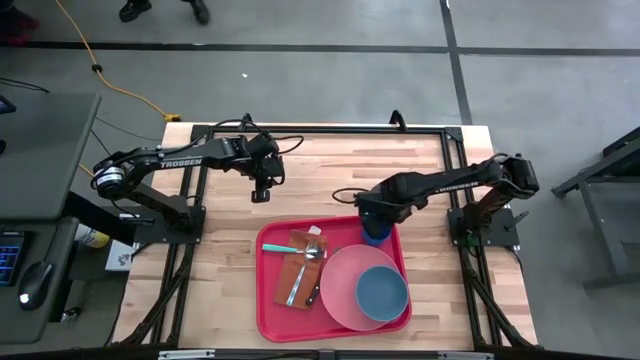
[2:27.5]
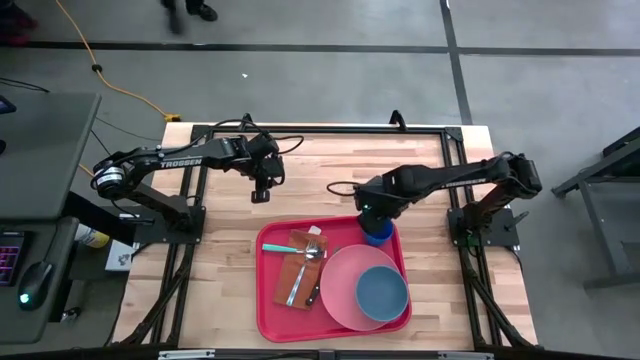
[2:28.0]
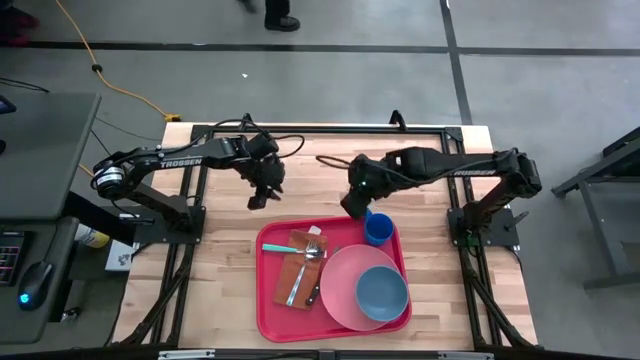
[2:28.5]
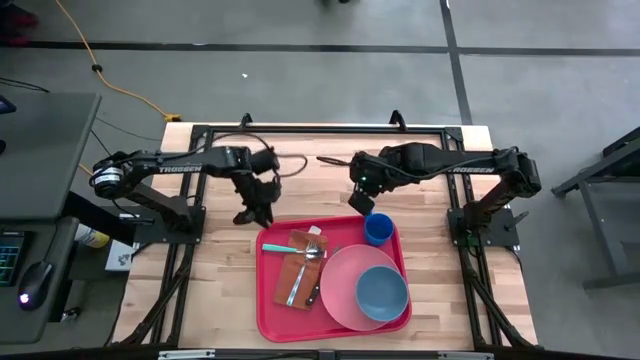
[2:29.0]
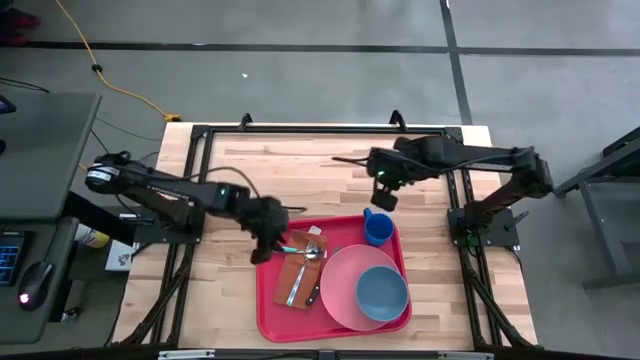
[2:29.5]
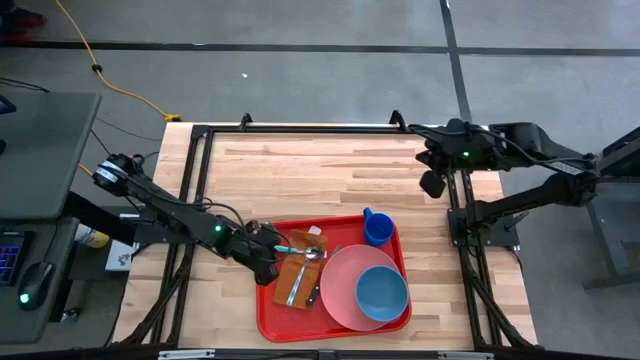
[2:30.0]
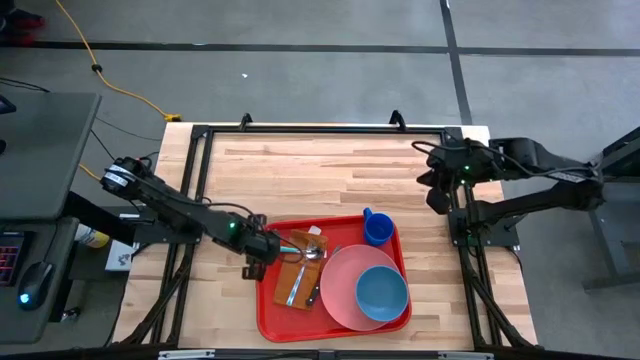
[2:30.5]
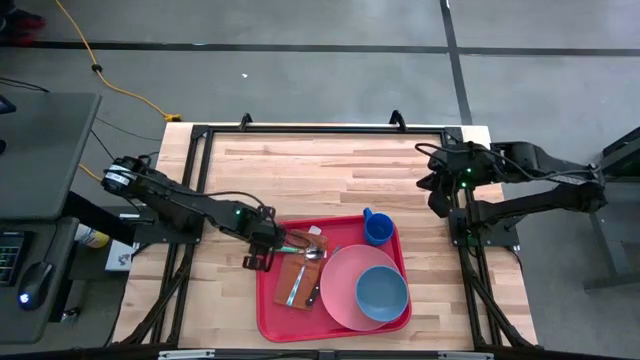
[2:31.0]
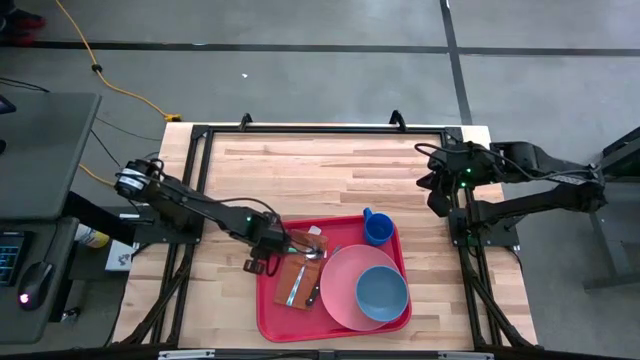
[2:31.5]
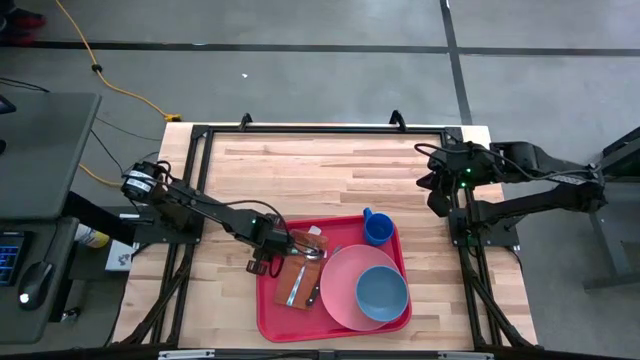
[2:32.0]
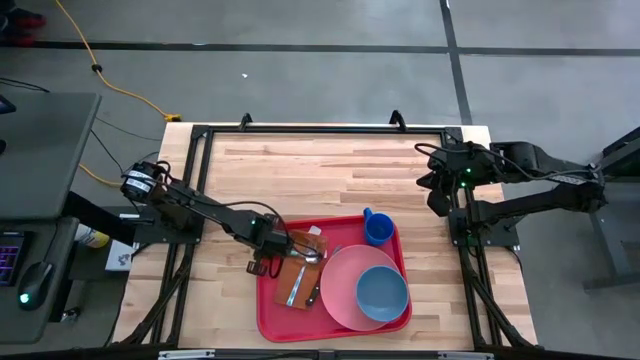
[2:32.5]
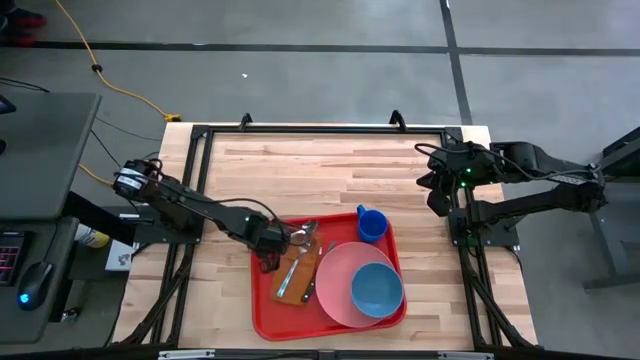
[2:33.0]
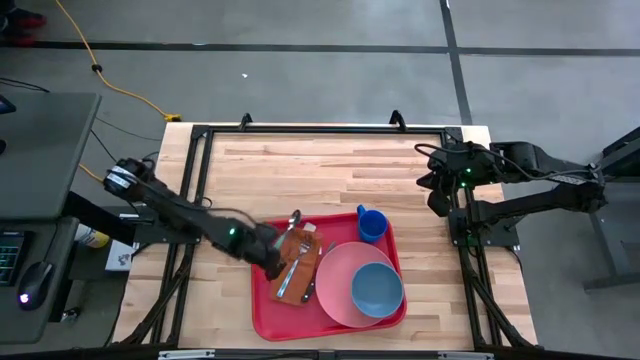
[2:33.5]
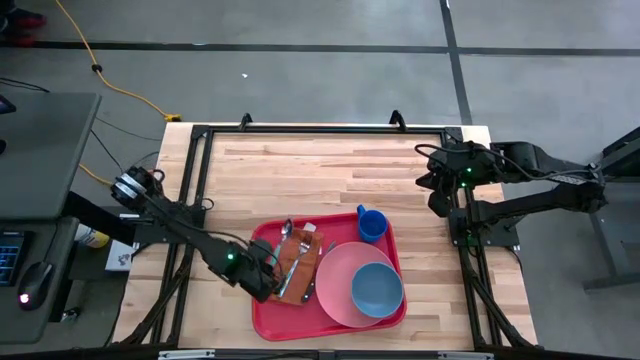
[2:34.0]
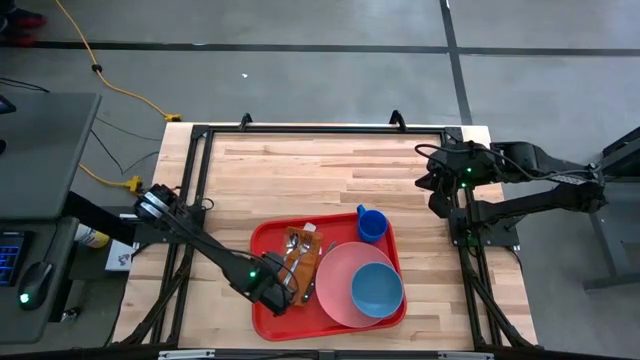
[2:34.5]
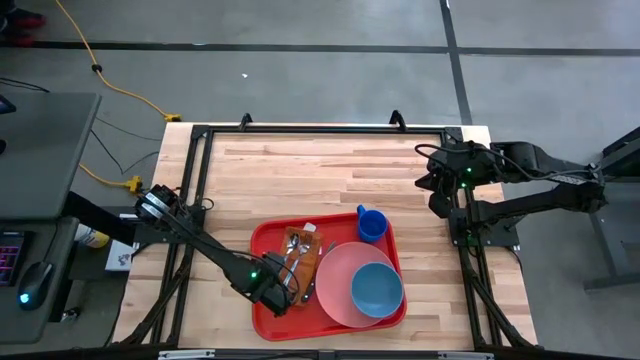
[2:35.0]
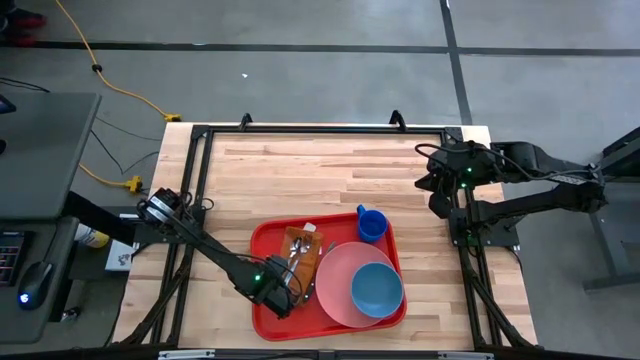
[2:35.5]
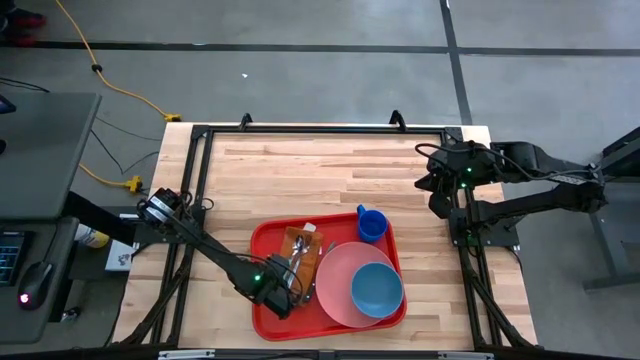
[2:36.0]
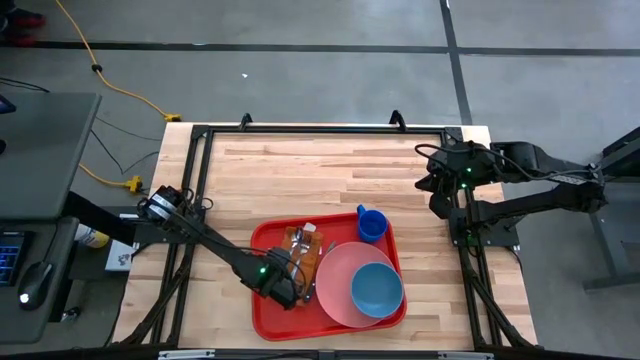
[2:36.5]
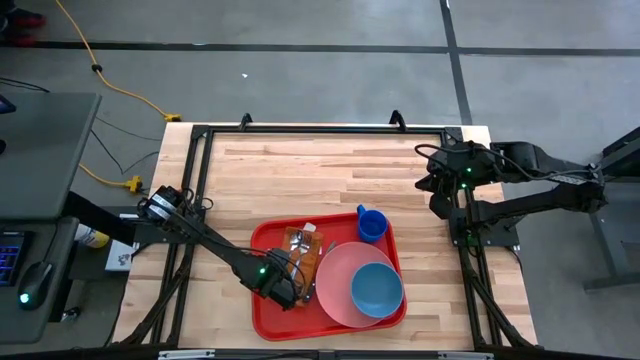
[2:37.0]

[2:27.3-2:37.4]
Task: Set up tray
Adjust the blue spoon on the orange napkin

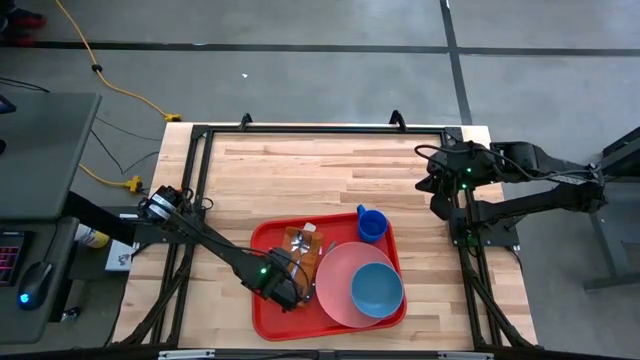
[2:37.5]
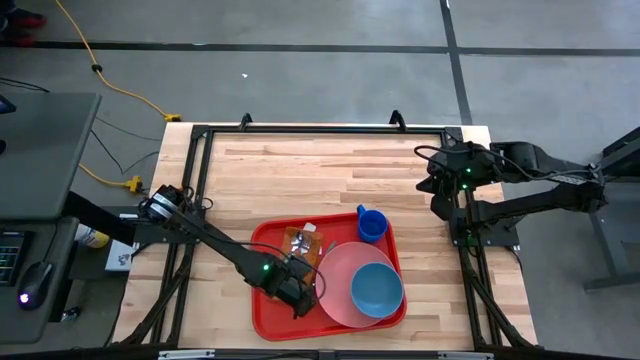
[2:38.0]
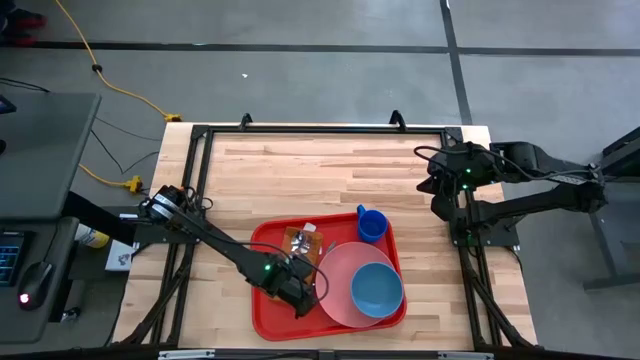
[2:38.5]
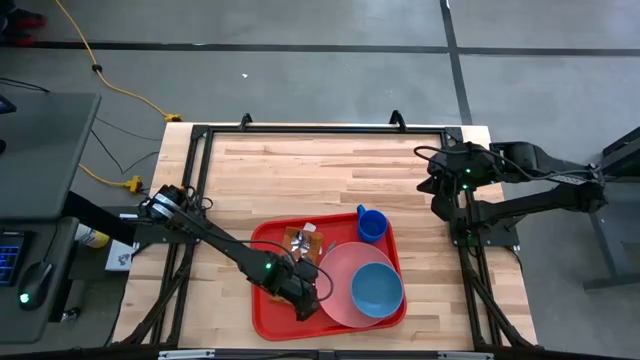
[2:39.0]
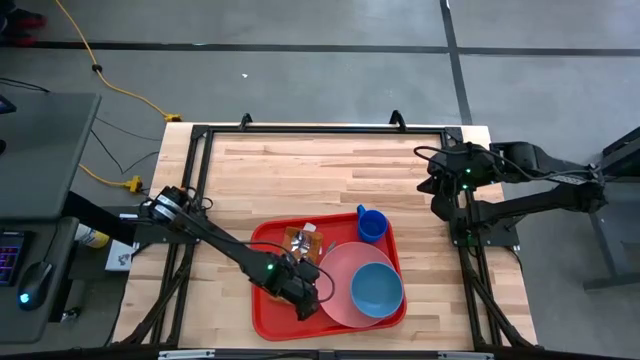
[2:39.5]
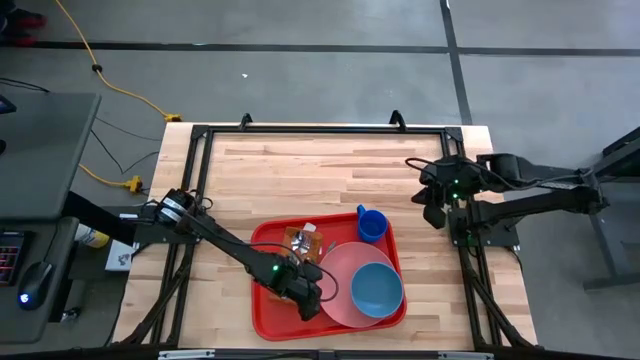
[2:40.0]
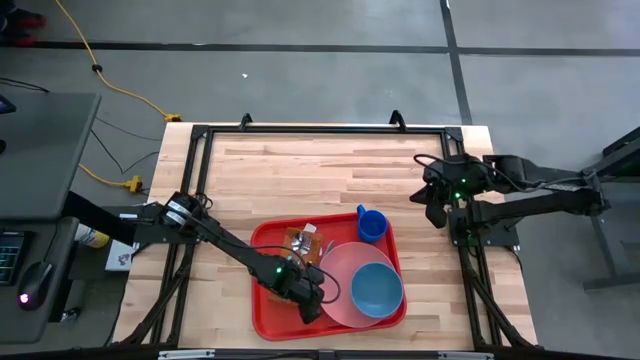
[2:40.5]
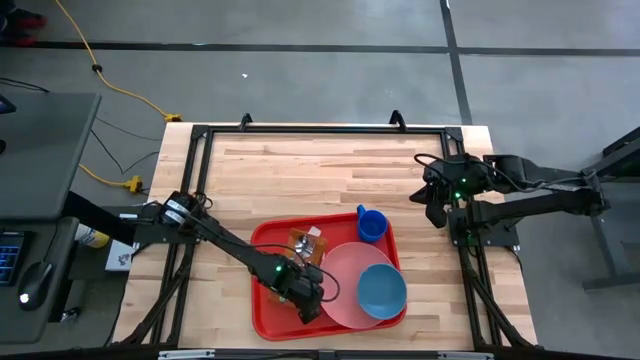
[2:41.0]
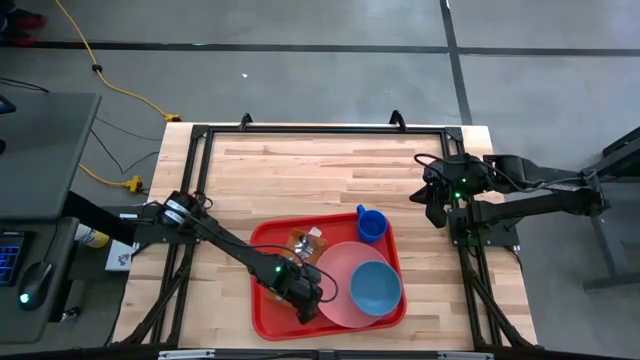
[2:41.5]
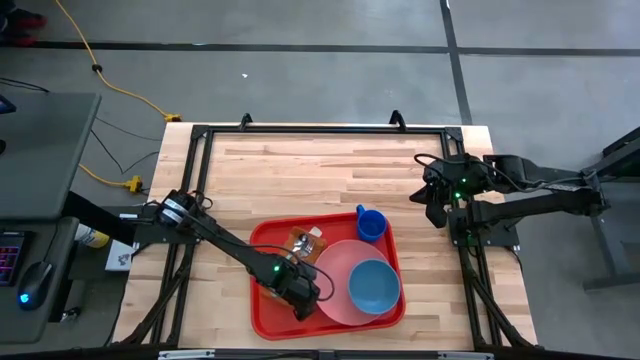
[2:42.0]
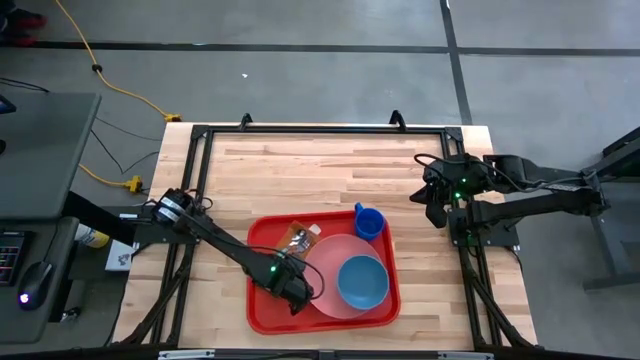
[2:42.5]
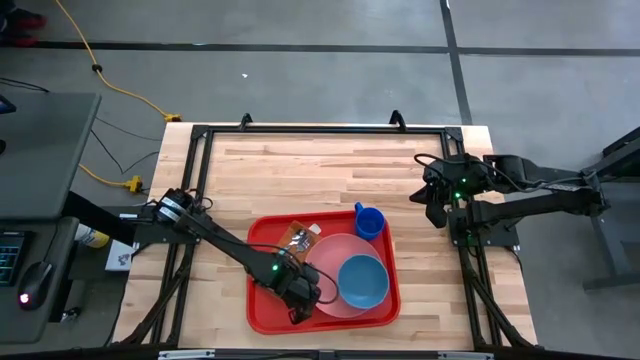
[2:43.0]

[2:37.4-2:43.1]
Adjust the knife on the orange napkin

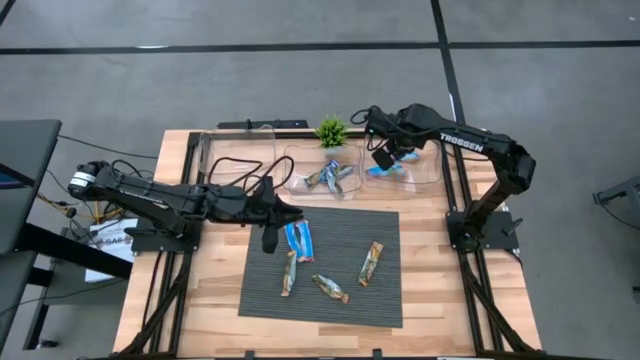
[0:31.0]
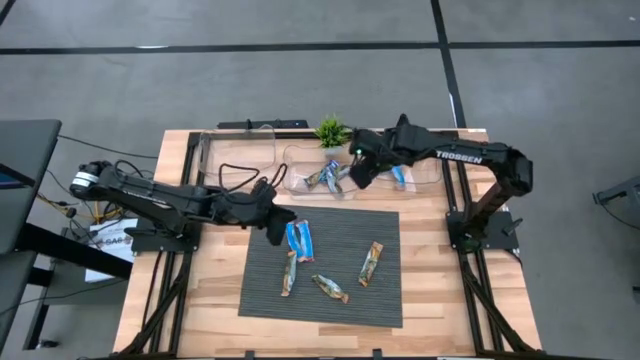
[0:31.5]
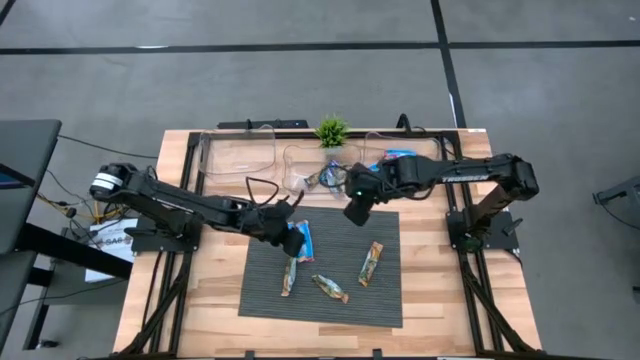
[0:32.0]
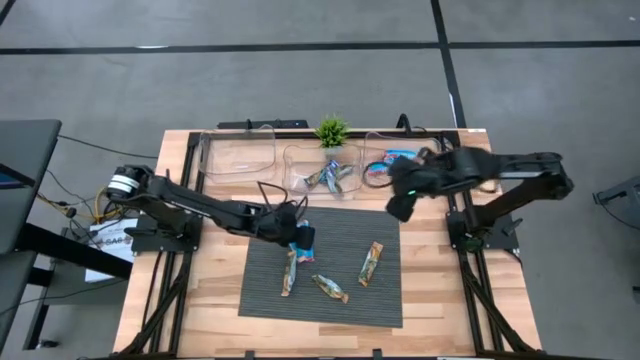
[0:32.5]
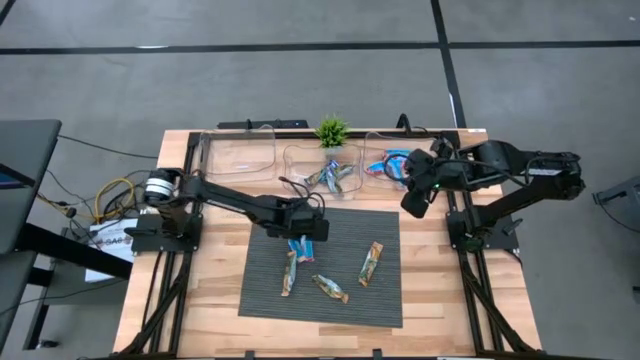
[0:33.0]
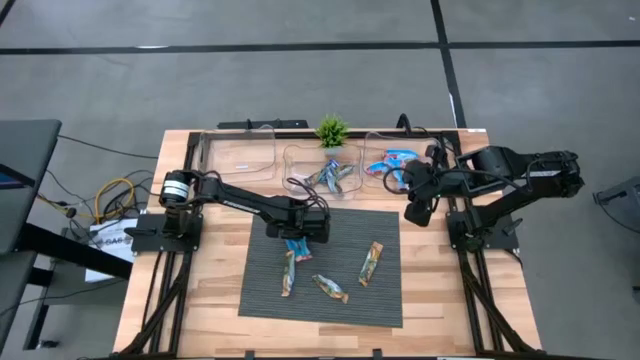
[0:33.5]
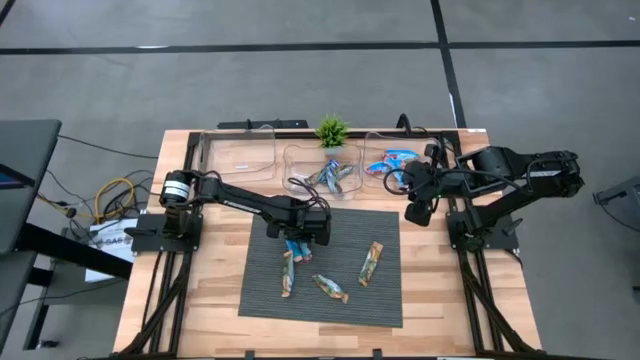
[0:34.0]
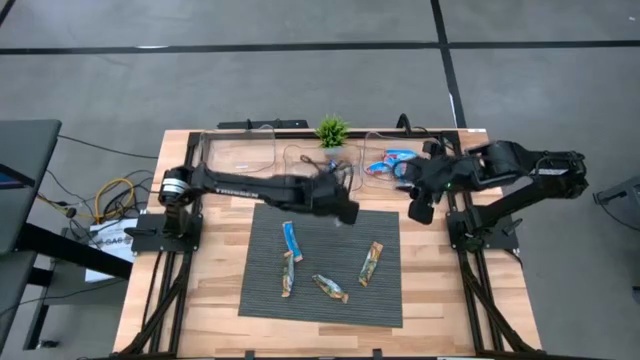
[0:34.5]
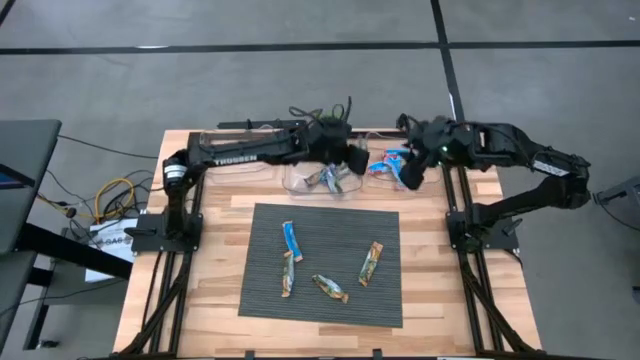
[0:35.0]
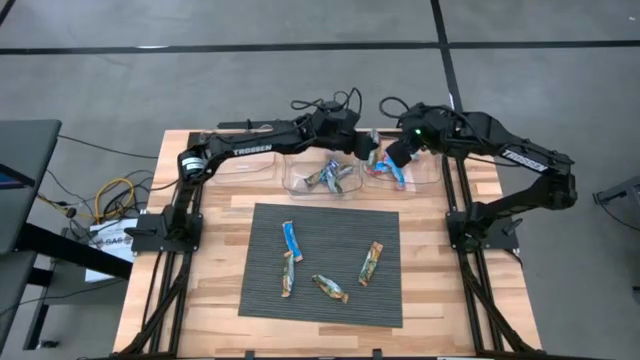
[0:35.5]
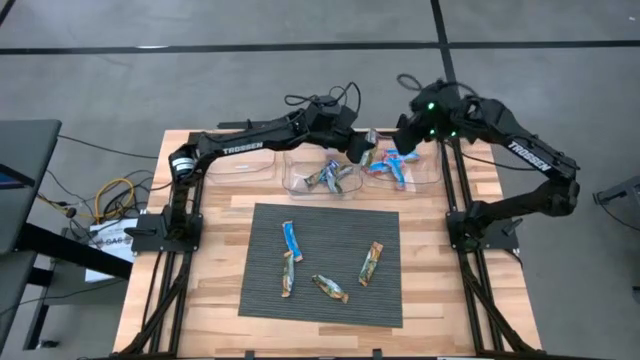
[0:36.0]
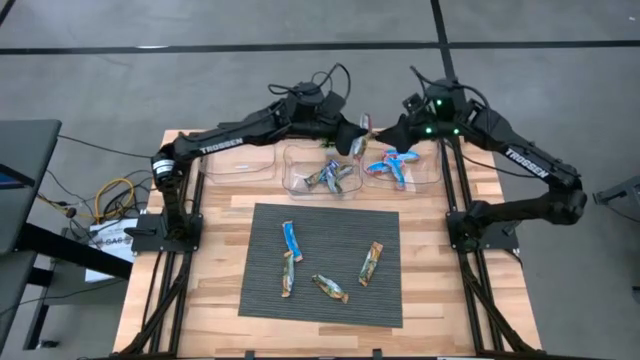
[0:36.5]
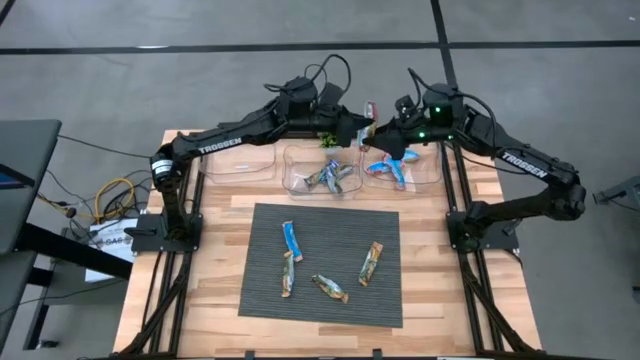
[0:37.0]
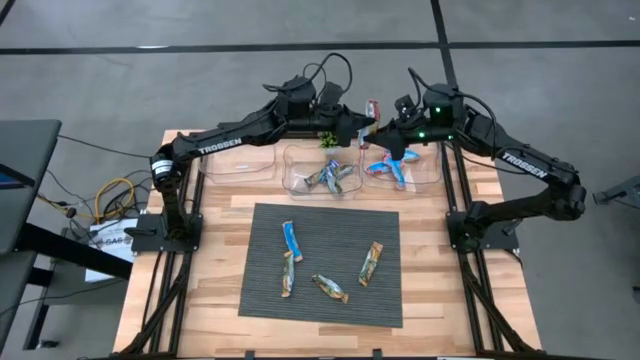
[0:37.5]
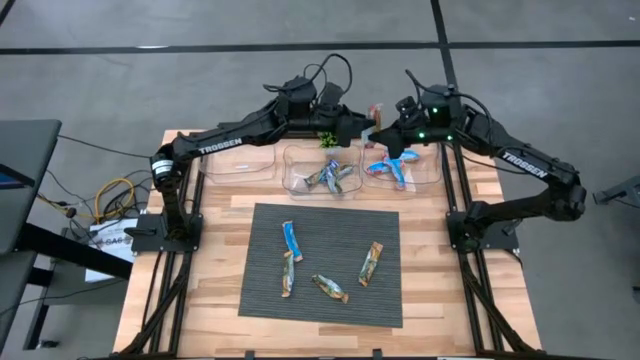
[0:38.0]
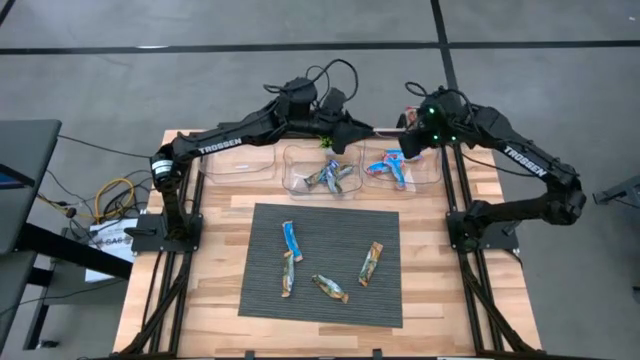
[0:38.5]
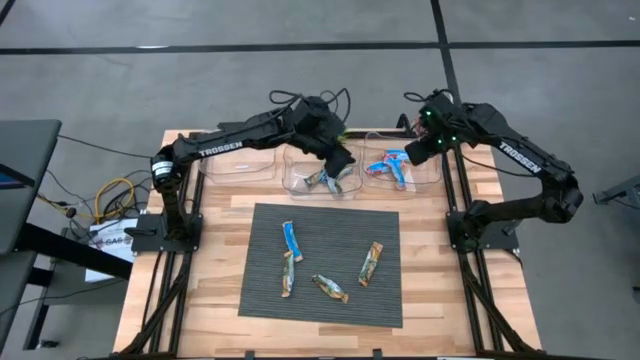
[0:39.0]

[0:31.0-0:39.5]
Task: Pick and place Granola Bars by type
Put the red granola bar into the right transparent bin
